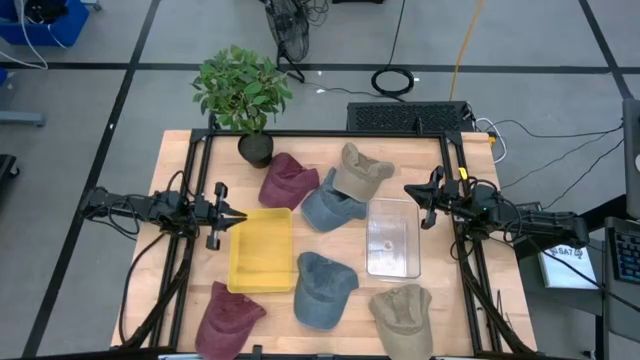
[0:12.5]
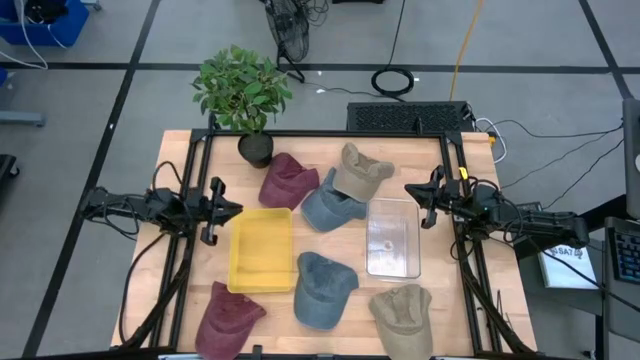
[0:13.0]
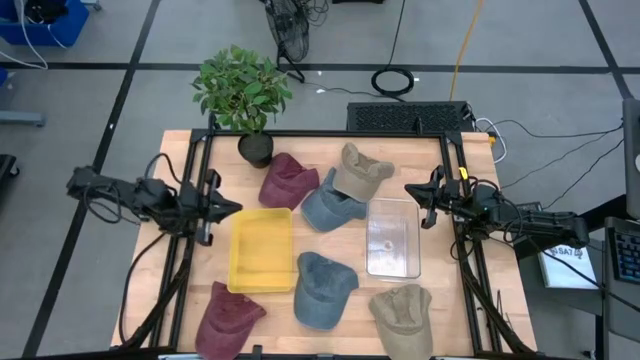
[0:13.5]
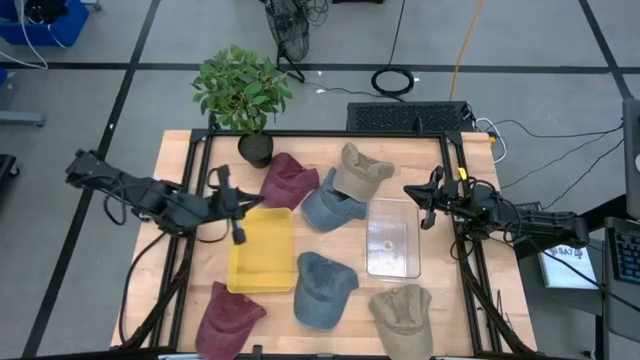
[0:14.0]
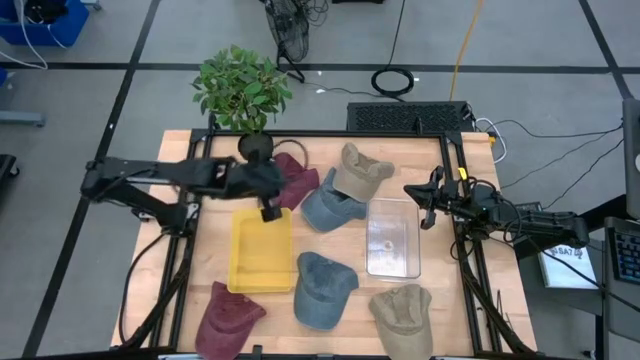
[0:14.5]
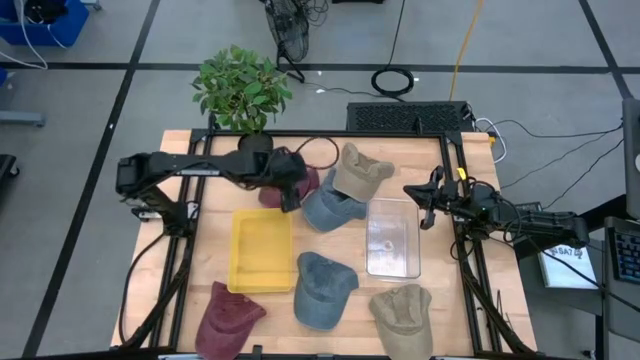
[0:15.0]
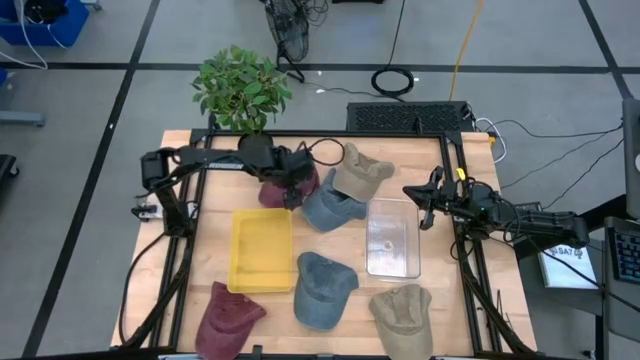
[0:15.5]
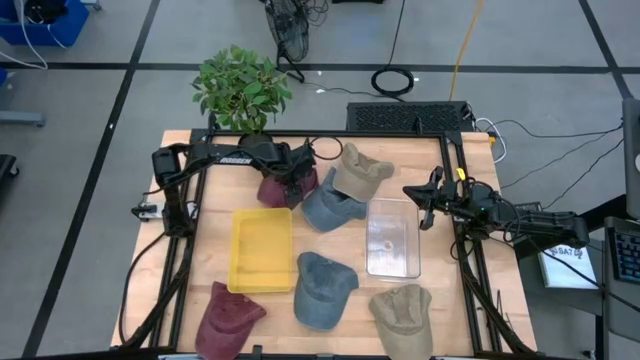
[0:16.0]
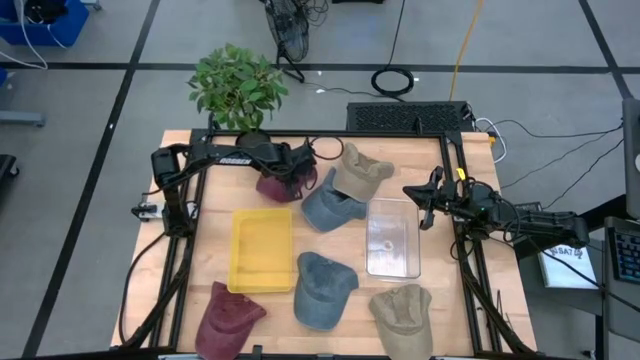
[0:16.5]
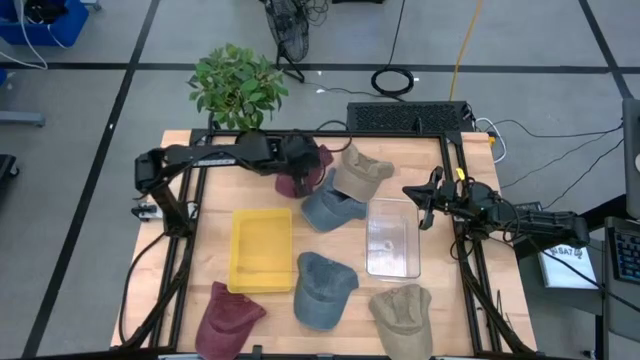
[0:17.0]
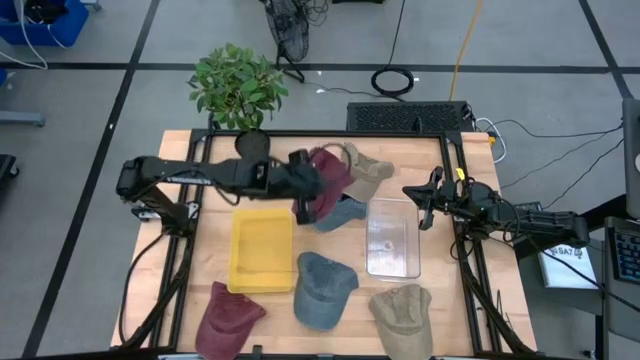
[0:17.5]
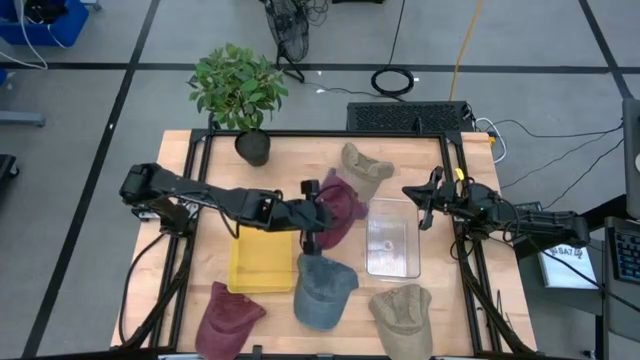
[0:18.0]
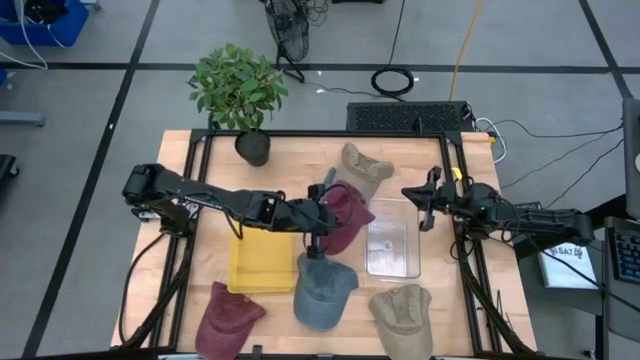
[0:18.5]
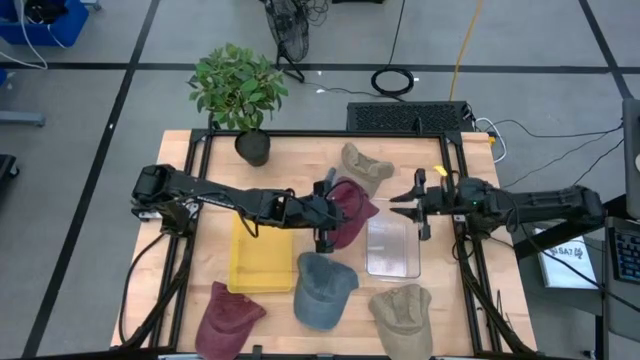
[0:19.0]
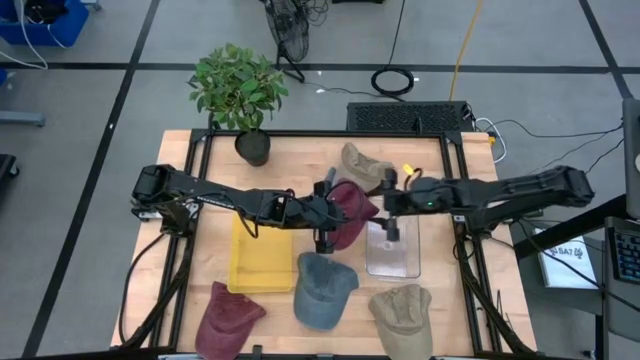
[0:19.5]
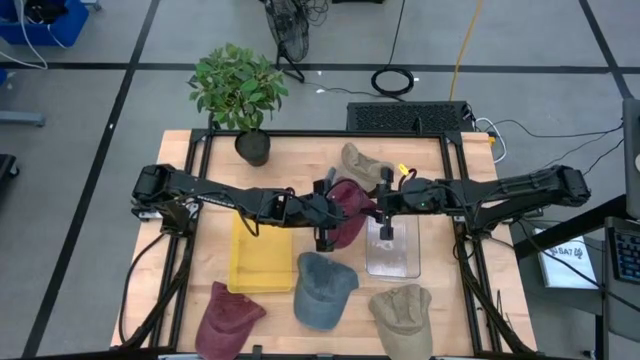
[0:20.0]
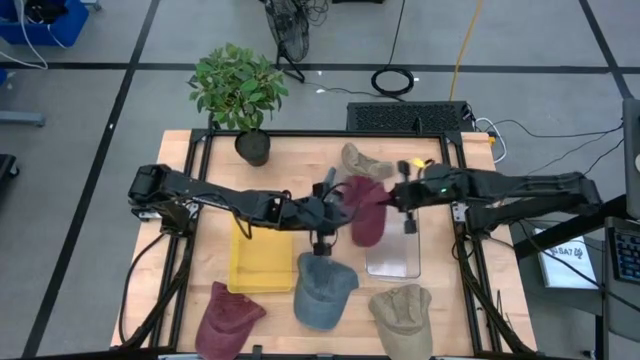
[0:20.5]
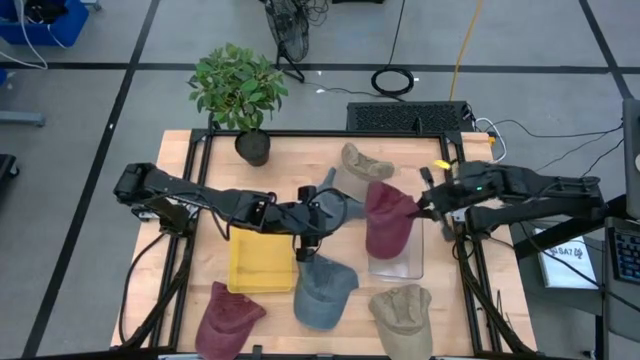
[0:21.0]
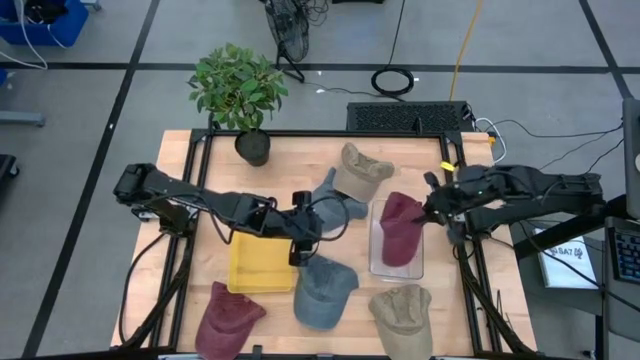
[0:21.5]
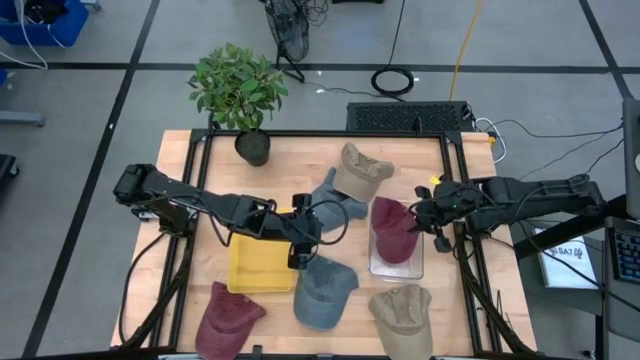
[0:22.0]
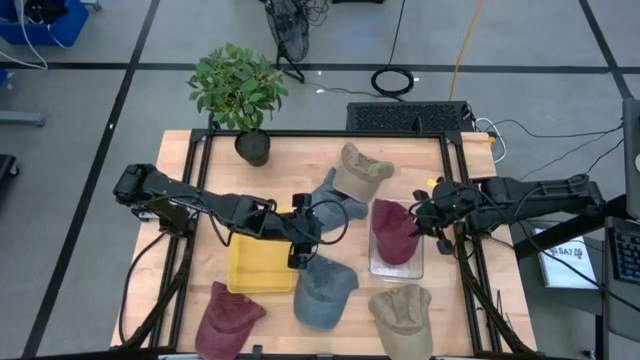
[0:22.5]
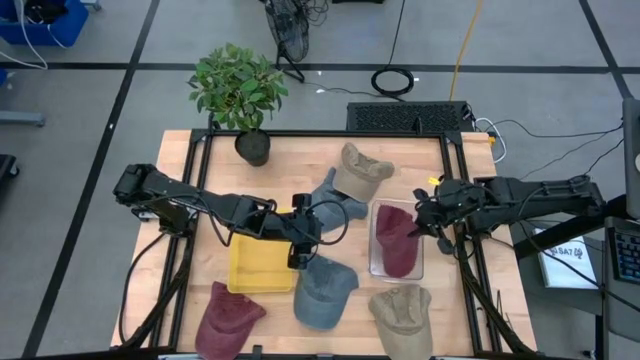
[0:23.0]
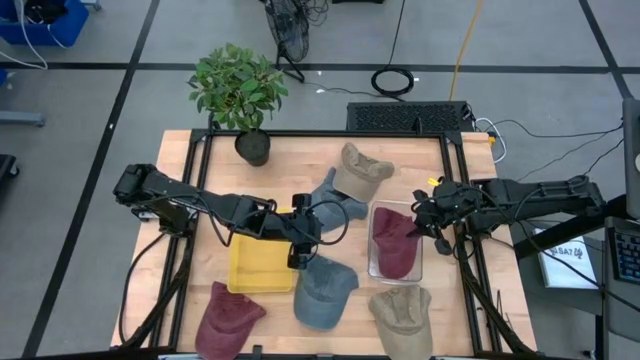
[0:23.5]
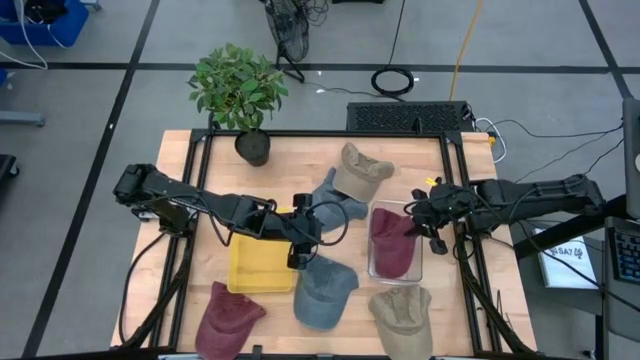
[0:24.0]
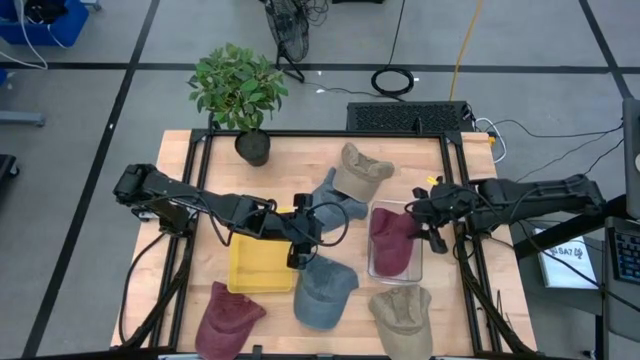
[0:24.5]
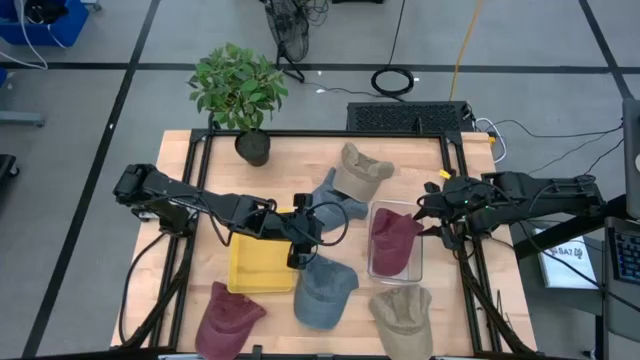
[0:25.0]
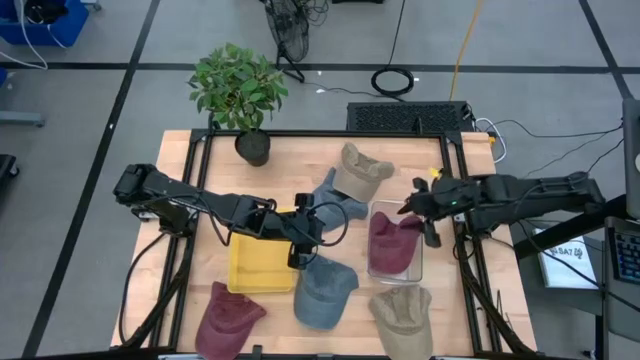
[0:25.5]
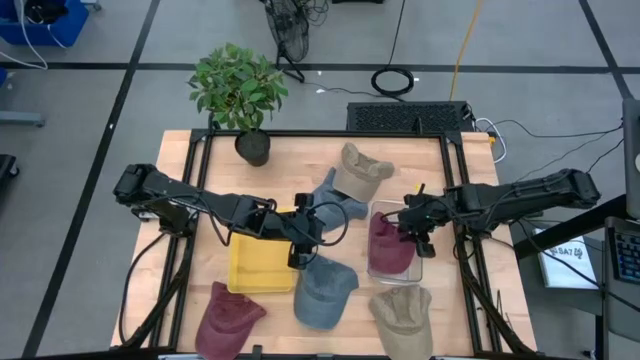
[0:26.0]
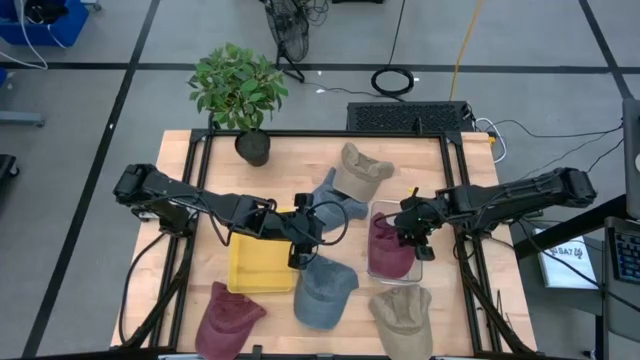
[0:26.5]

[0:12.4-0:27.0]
Task: Pick and place caps into container
Put the top red cap into the transparent container

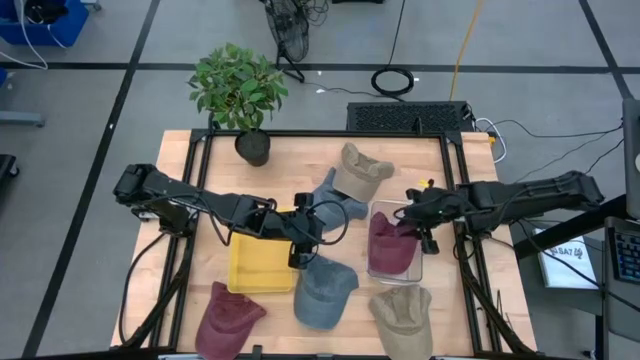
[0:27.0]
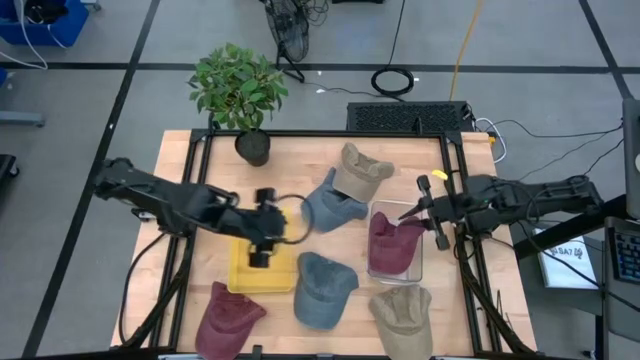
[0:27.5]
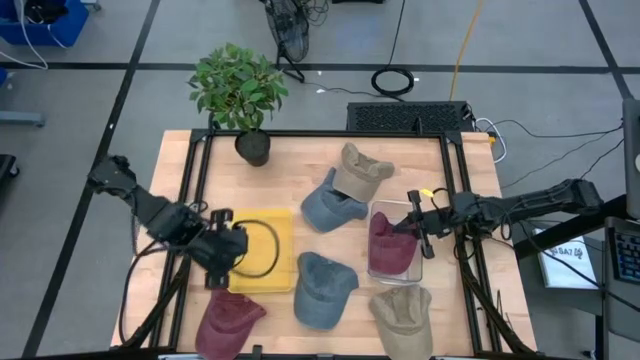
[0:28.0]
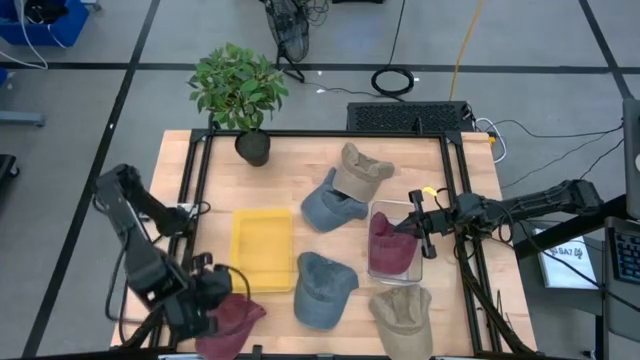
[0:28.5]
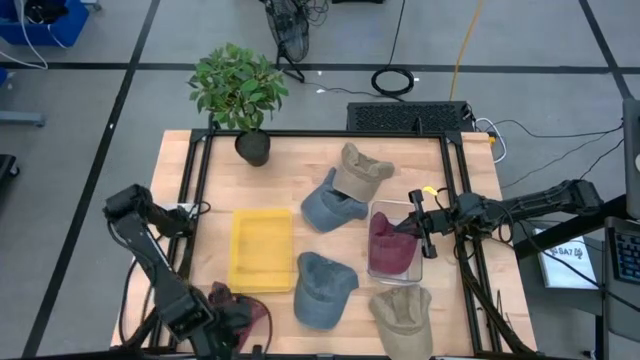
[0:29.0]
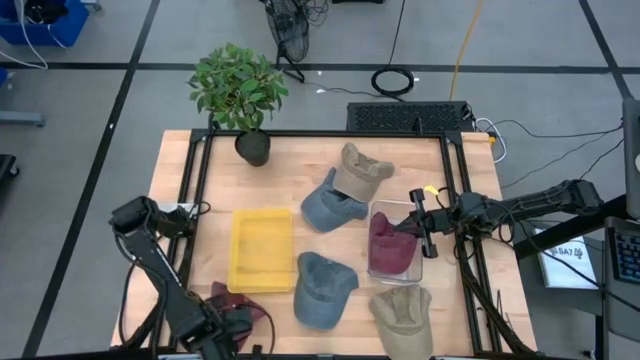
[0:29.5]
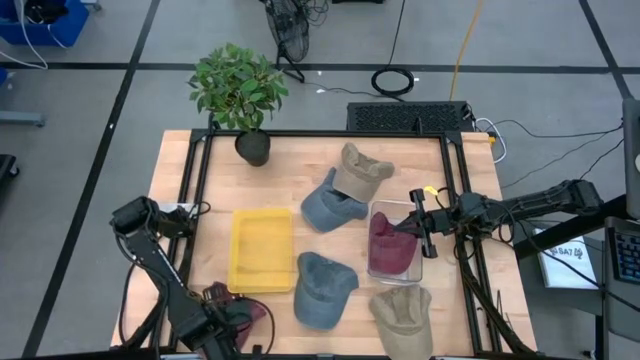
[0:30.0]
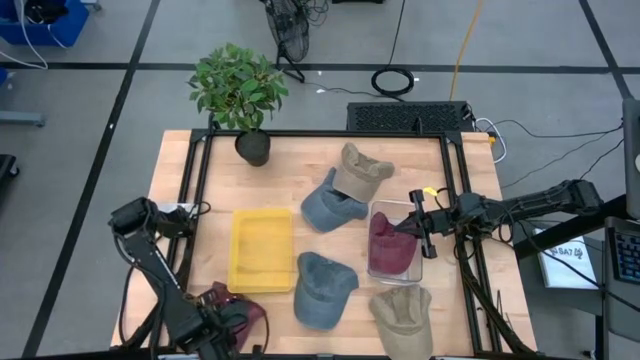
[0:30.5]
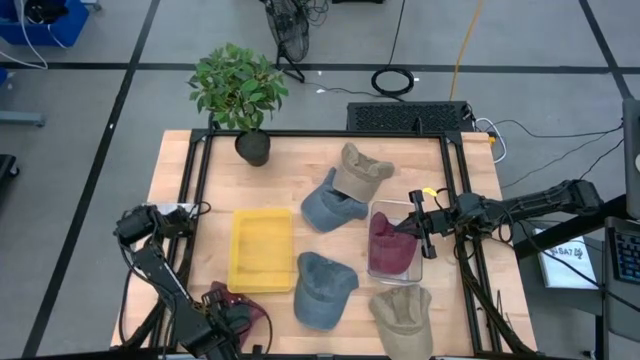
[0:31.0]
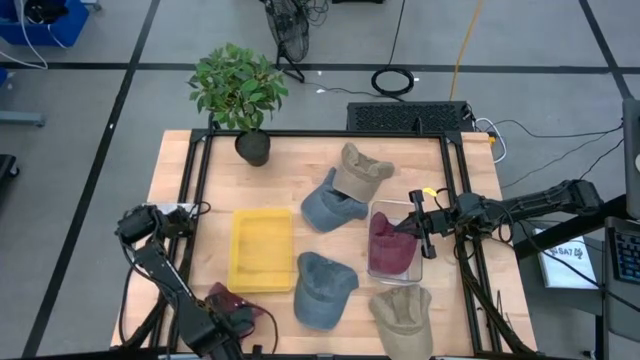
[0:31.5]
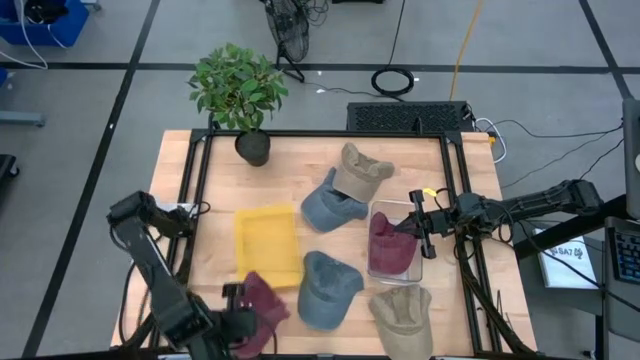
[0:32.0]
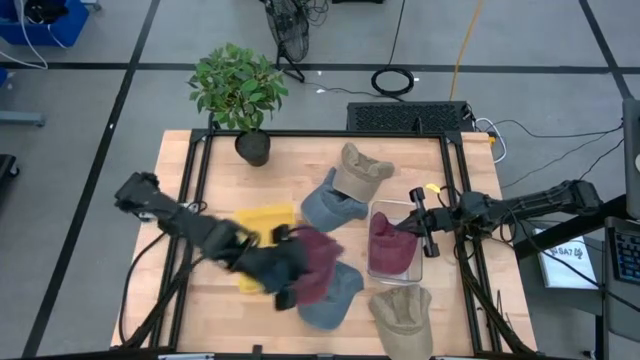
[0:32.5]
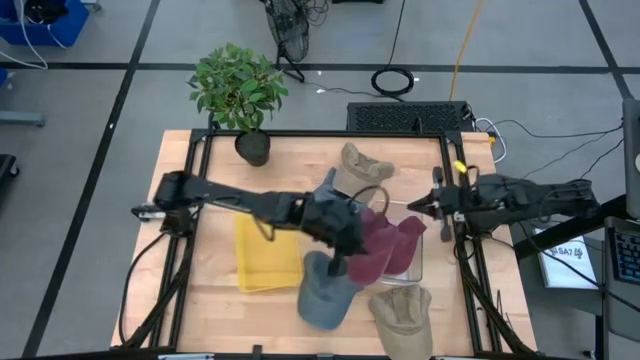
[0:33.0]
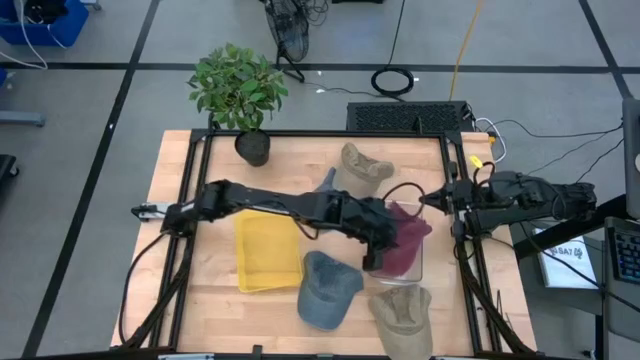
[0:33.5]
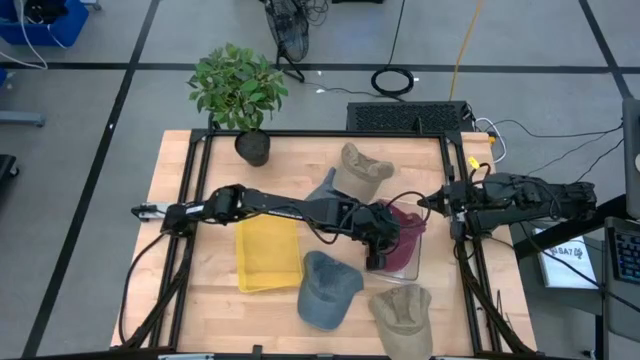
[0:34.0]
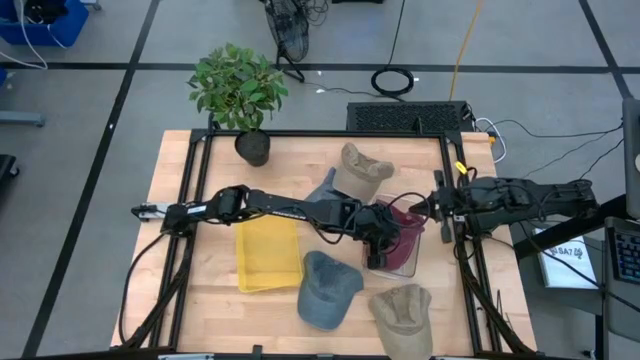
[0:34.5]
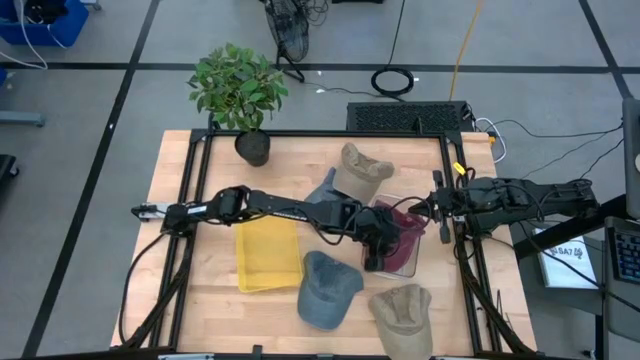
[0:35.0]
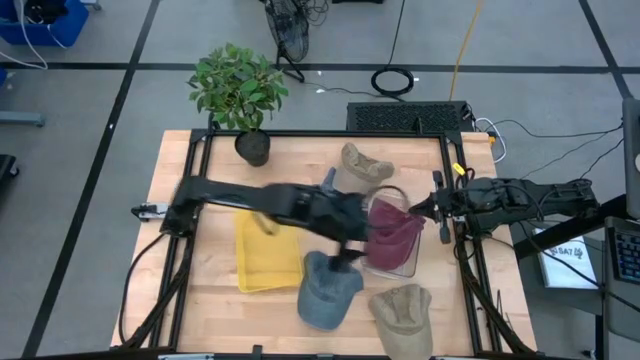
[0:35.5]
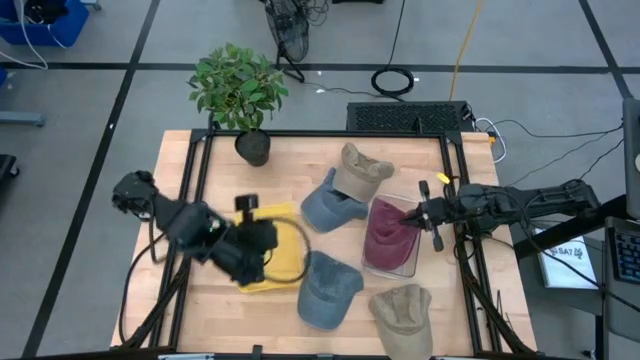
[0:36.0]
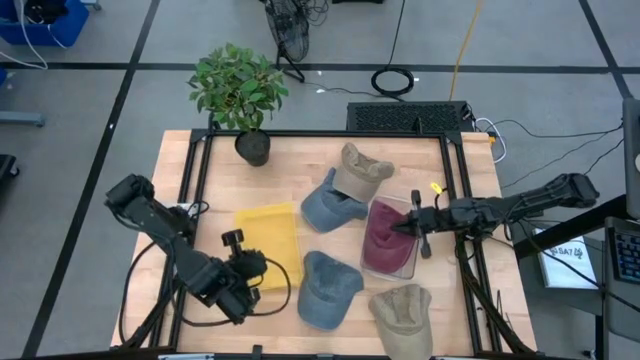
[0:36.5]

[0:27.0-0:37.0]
Put the red cap into the transparent container
